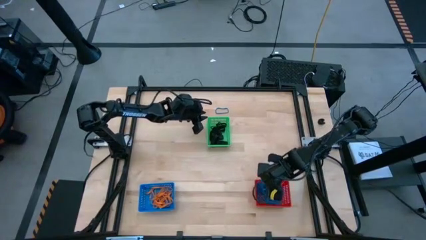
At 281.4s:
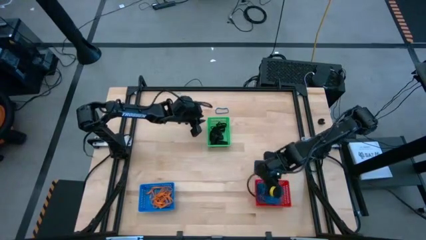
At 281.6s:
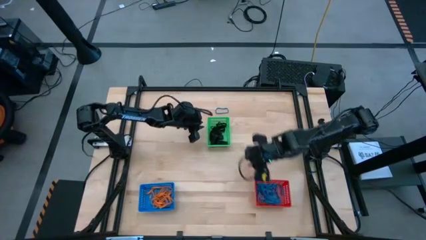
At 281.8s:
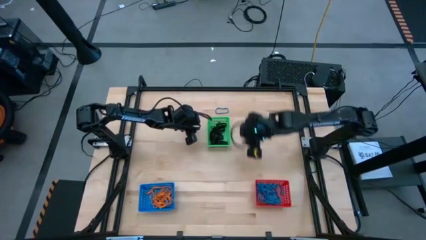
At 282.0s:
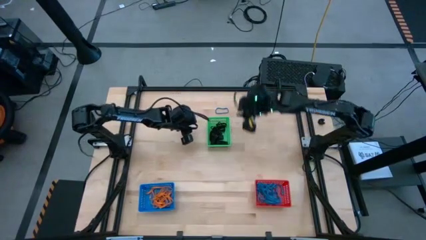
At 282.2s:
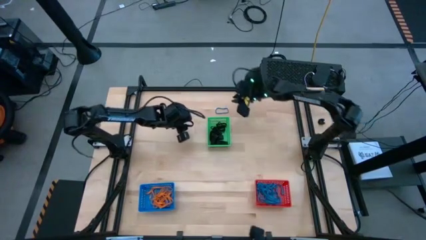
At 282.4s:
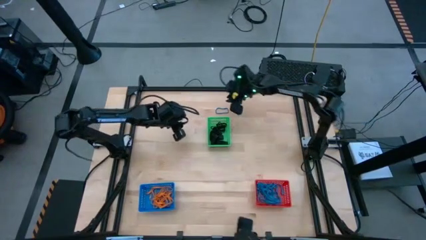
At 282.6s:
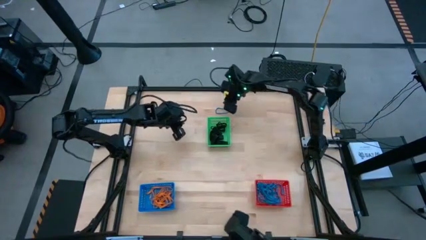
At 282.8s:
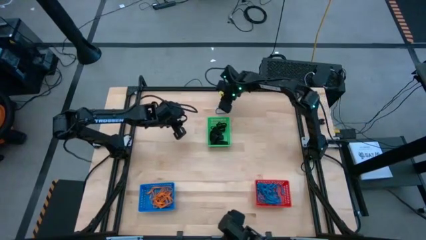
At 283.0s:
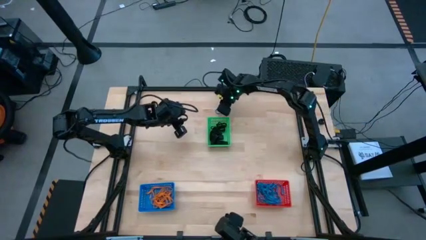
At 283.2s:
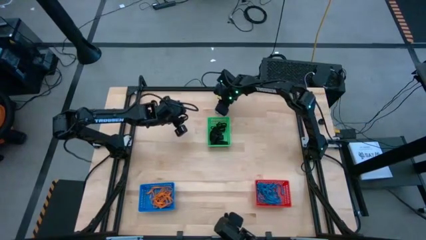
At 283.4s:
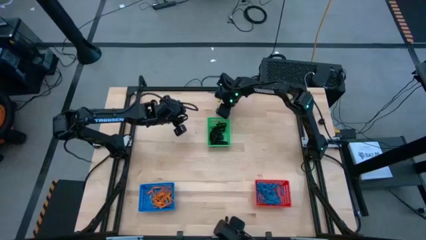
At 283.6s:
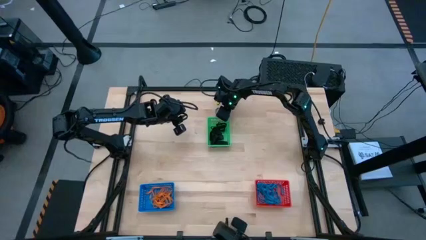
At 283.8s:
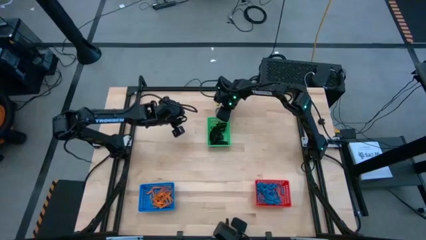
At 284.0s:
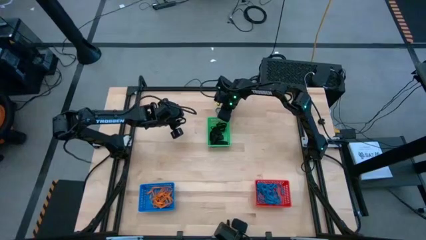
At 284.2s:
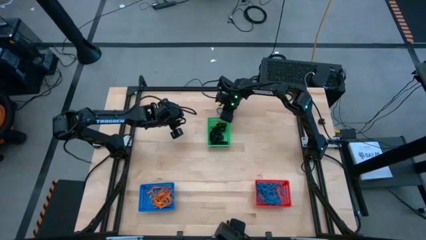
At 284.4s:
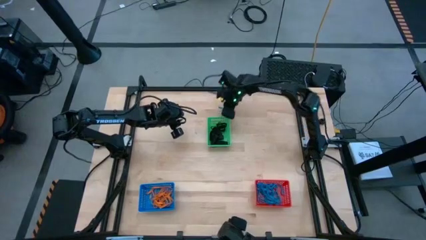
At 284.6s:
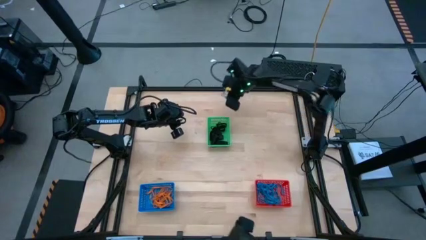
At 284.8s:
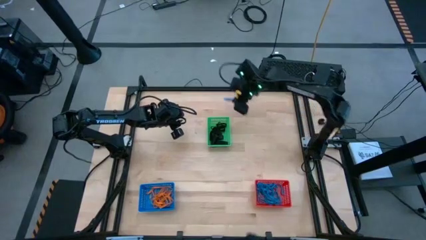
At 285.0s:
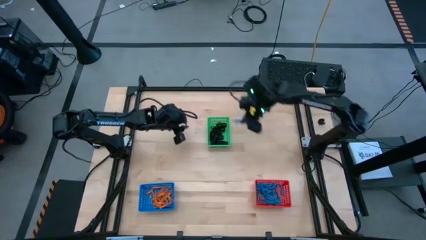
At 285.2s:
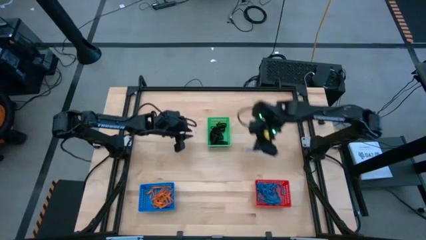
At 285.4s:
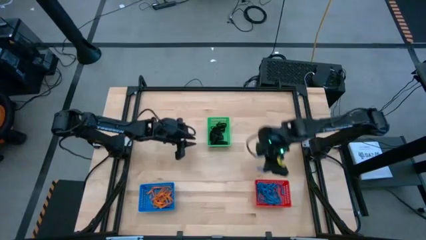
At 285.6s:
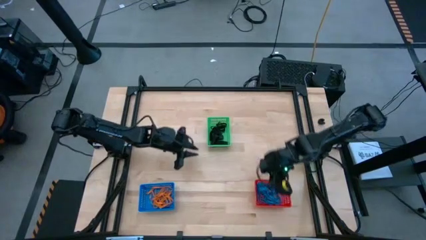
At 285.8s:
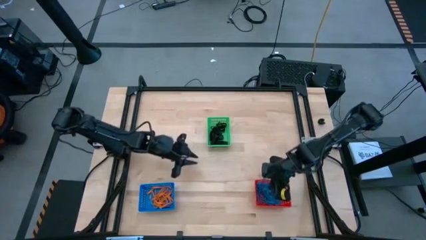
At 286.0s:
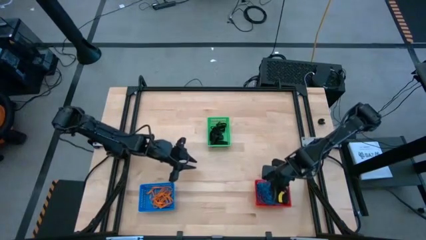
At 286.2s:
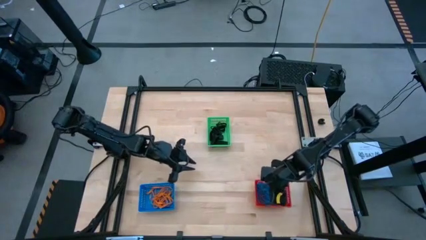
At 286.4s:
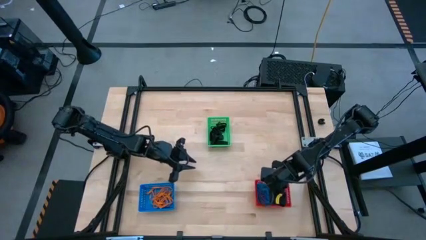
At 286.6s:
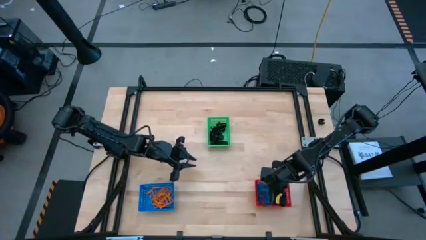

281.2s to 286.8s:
Task: Sort rubber bands into baskets
Put the blue rubber band into the red bin

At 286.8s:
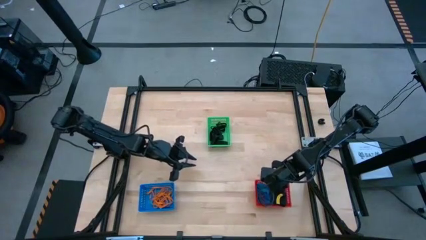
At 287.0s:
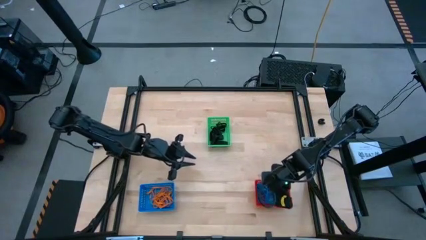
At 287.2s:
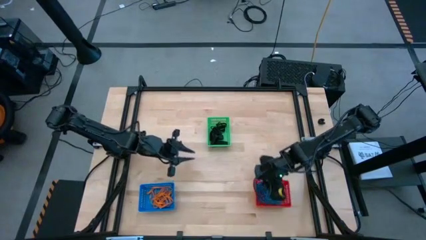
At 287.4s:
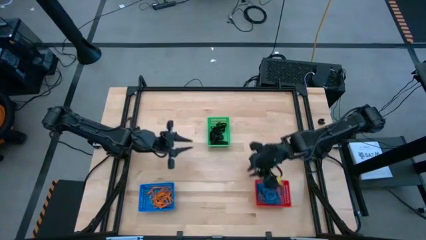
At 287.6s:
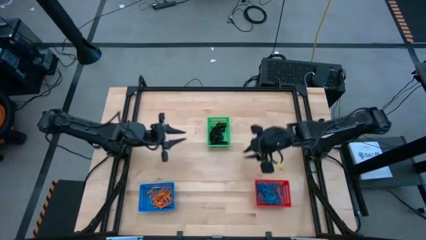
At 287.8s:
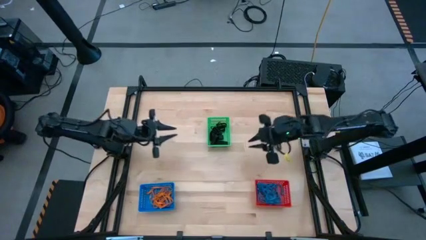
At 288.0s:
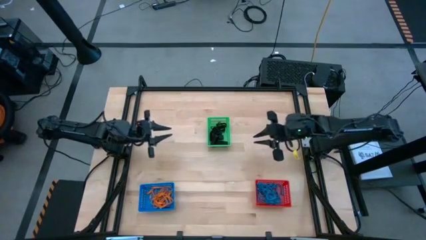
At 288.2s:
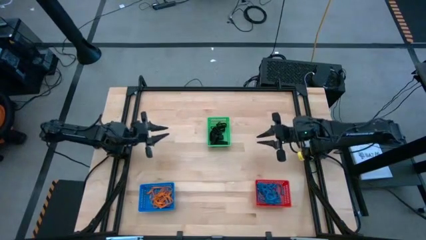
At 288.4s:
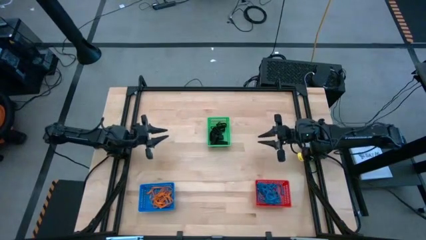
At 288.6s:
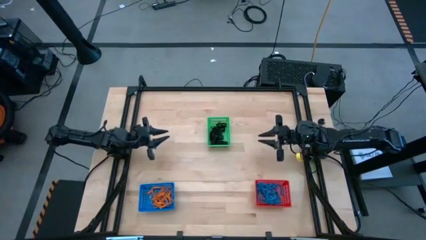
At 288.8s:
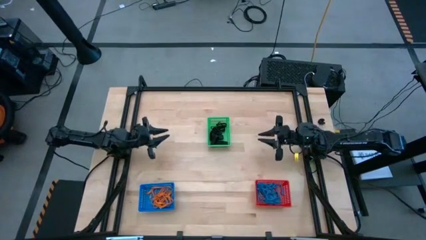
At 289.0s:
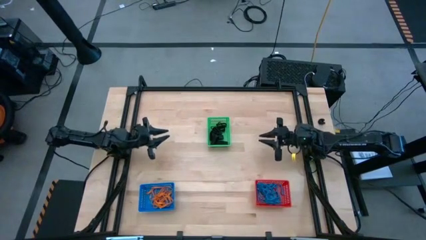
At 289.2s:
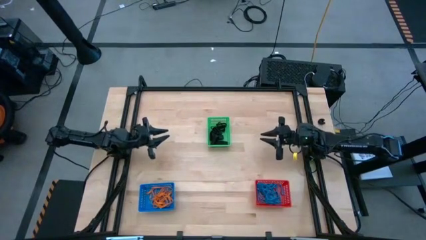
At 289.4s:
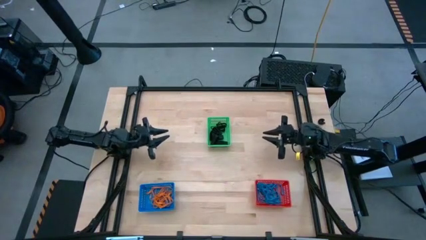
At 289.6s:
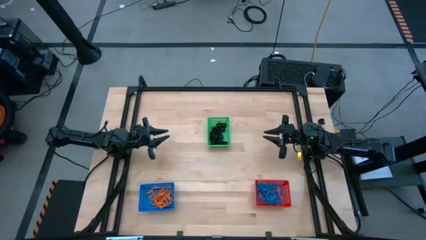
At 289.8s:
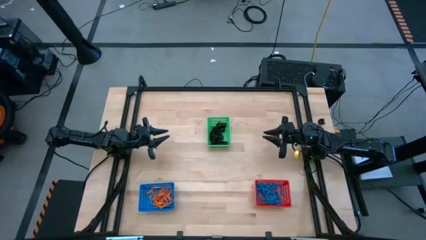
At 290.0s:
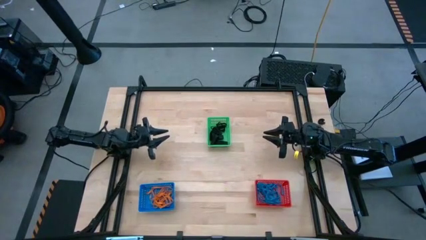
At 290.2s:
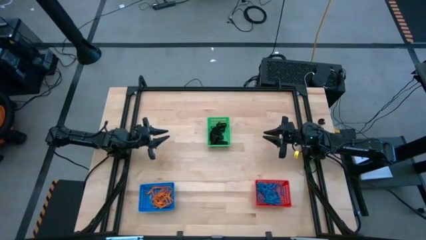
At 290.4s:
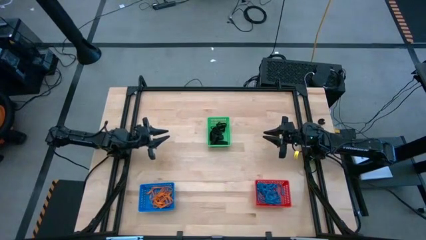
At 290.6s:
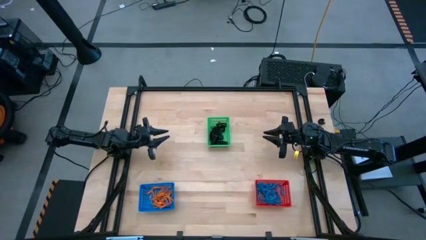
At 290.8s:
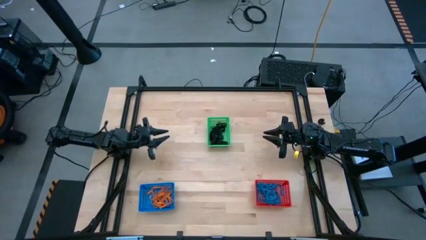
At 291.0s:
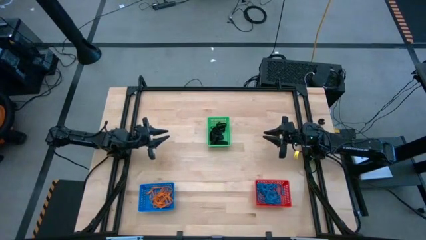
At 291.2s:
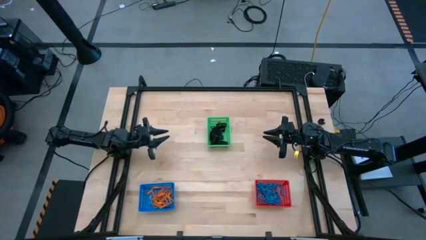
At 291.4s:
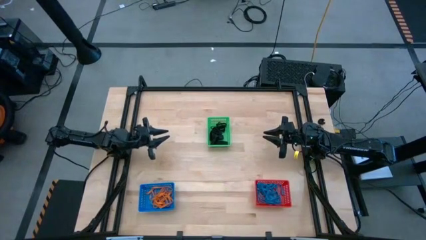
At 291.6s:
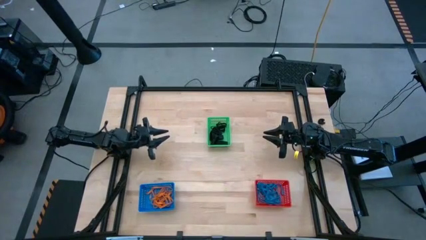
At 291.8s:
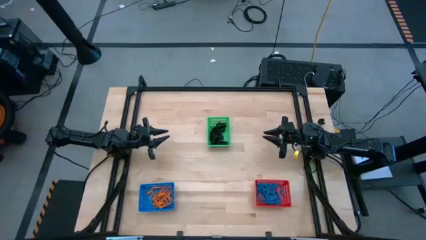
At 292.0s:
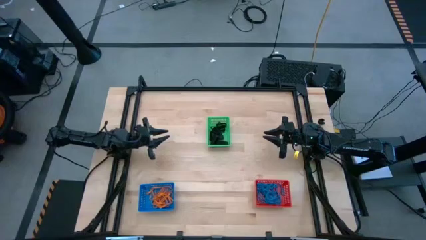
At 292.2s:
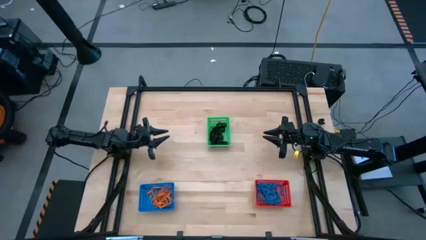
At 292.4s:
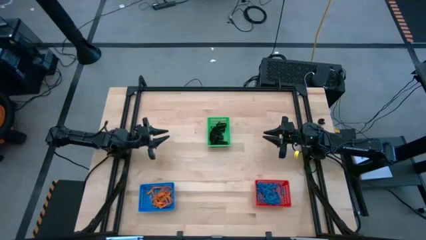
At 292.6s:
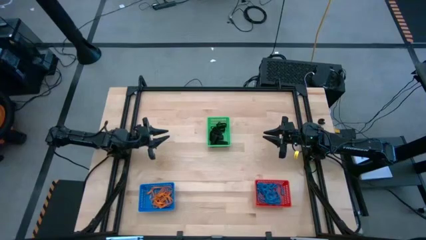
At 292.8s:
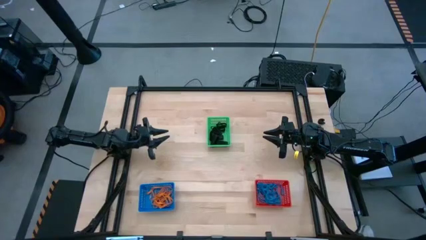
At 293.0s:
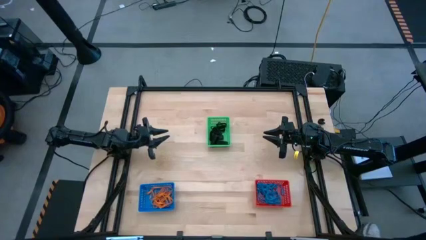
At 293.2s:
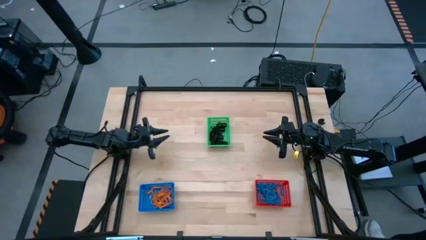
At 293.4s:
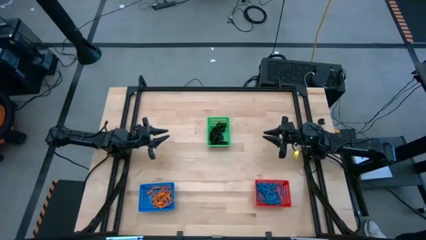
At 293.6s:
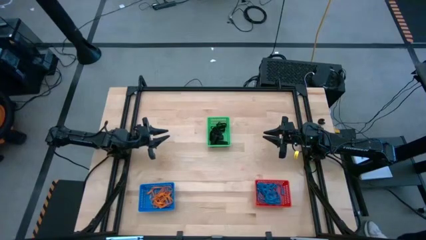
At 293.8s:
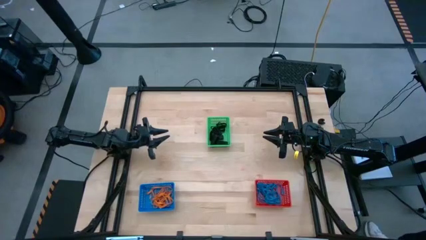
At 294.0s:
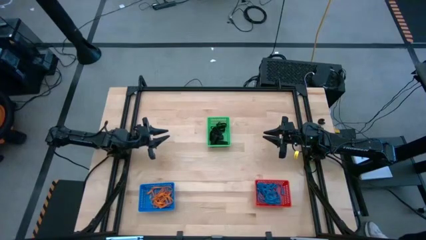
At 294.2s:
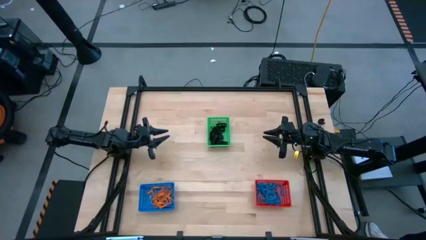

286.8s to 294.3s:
Return to Home Position

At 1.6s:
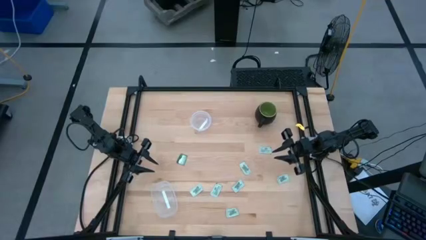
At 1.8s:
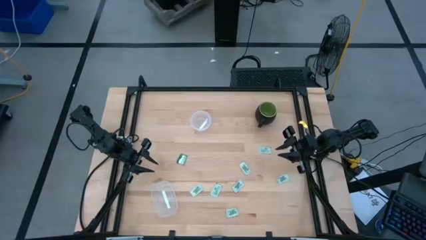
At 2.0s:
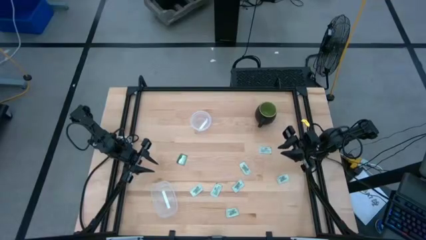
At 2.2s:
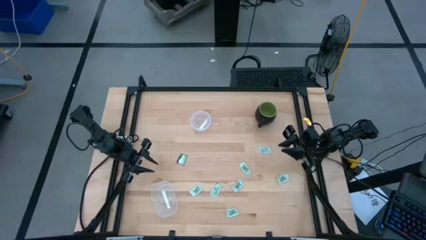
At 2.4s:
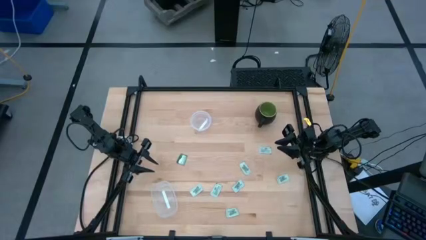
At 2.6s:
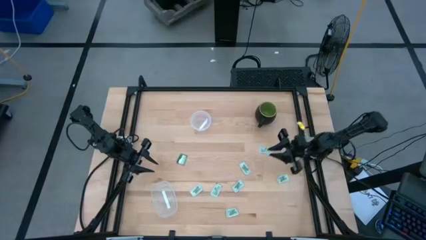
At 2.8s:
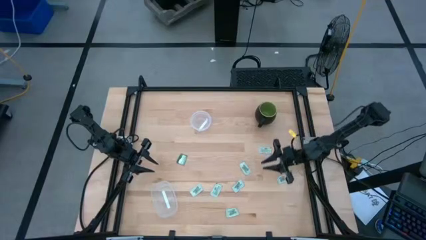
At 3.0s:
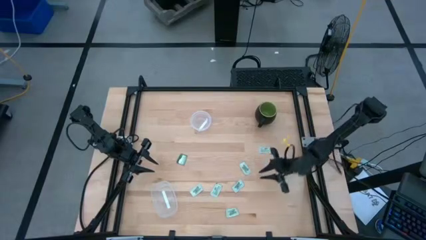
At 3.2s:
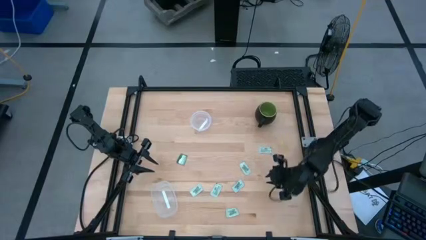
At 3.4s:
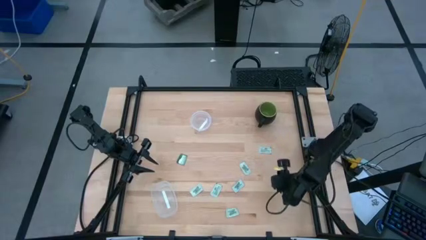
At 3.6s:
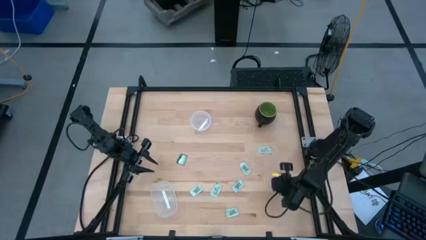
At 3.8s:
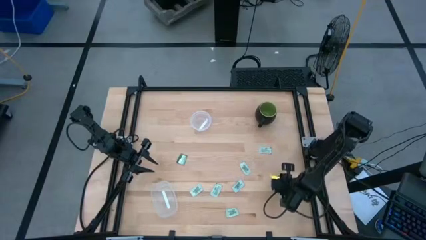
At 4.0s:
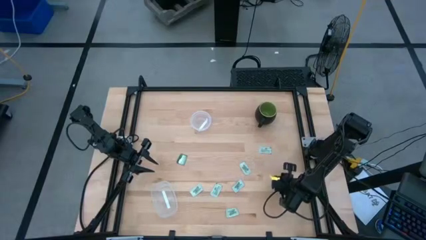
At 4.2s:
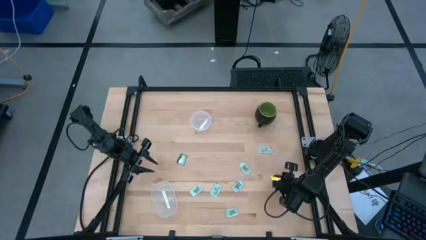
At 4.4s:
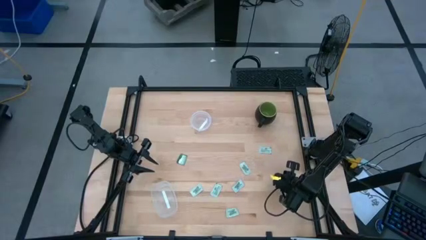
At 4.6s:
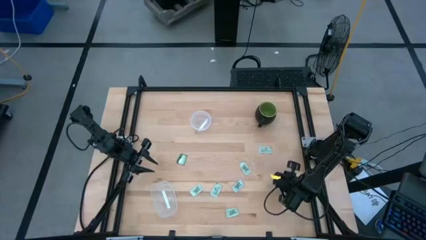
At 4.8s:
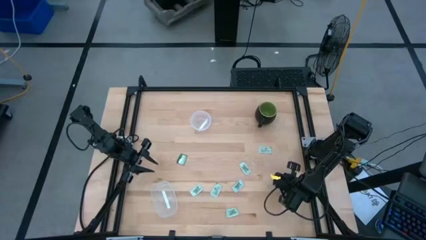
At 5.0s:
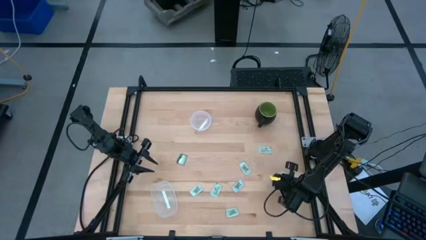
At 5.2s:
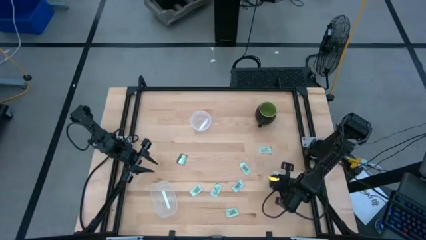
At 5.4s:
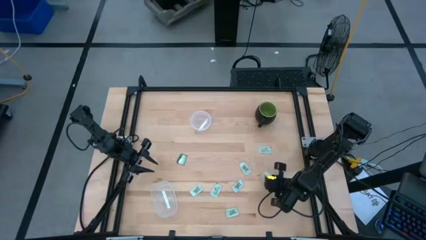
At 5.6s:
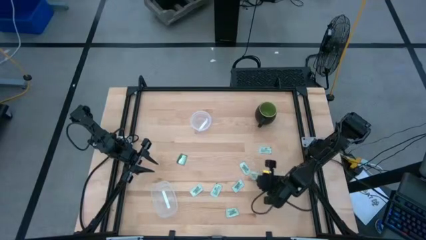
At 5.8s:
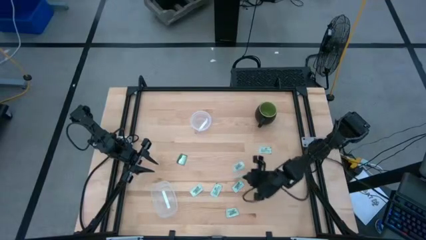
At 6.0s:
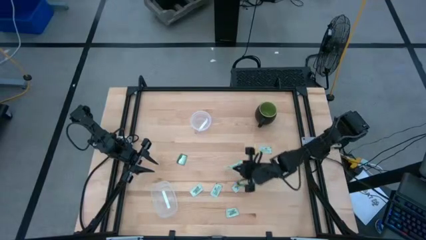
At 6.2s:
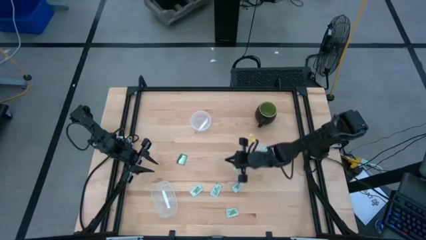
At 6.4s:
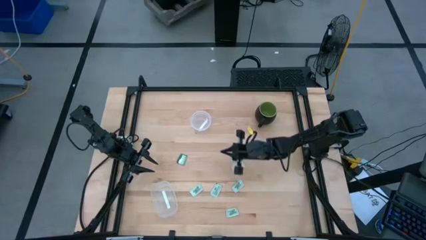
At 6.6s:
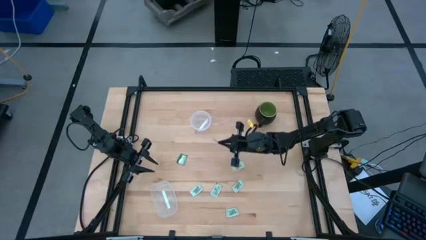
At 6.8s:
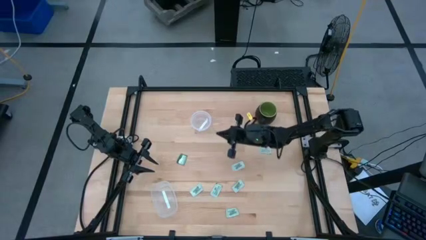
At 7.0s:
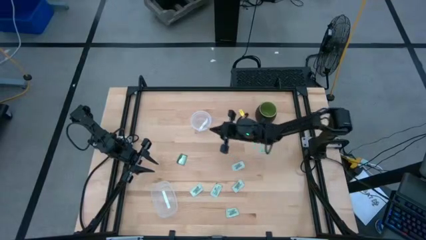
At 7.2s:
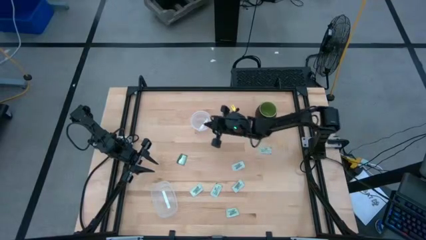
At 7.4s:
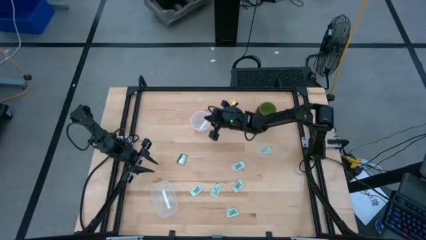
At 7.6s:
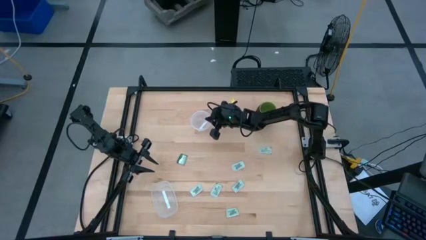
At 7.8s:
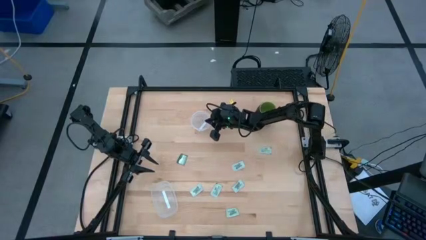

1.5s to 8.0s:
Task: Pick and place Stevia / Truvia into bins
Put the stevia packet into the transparent circle container
